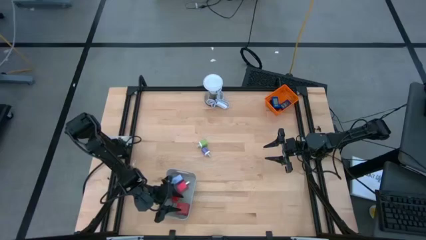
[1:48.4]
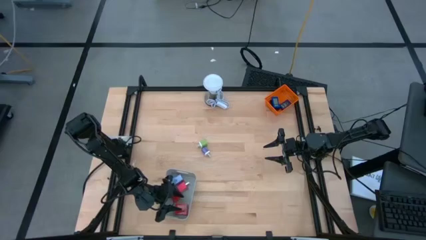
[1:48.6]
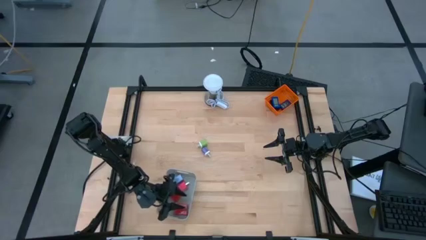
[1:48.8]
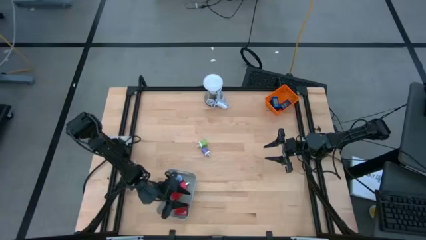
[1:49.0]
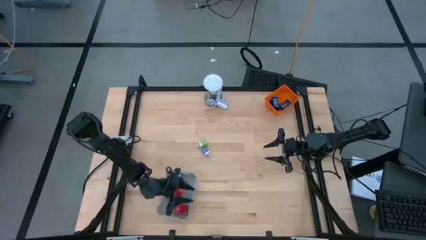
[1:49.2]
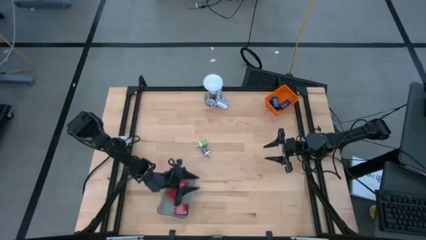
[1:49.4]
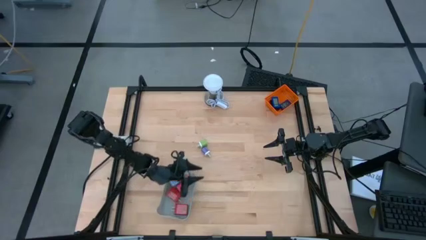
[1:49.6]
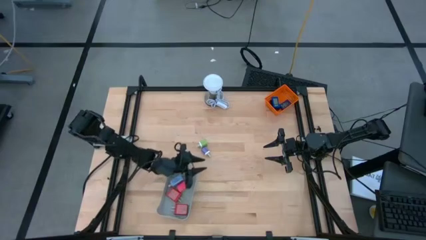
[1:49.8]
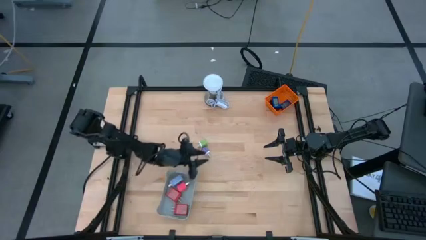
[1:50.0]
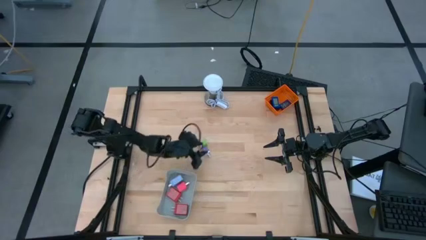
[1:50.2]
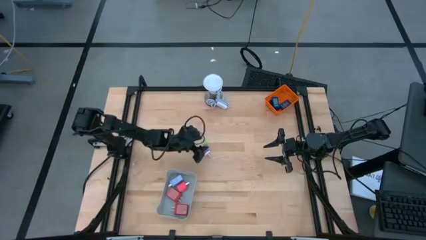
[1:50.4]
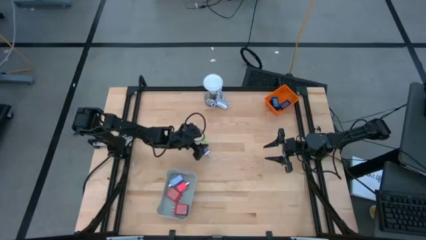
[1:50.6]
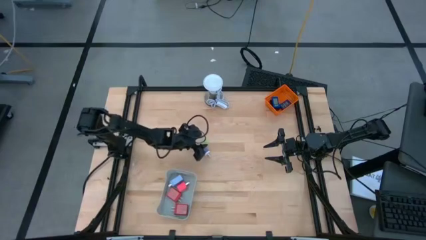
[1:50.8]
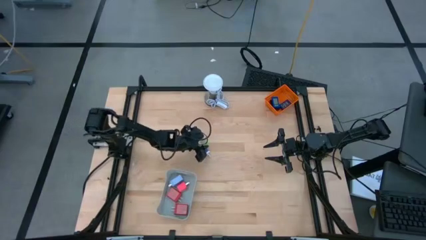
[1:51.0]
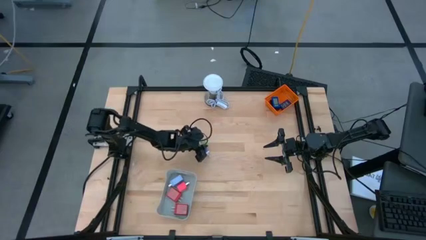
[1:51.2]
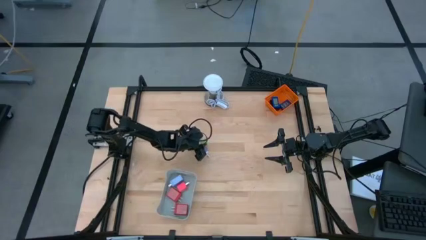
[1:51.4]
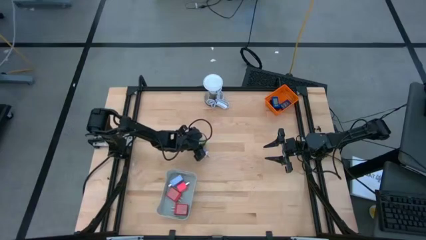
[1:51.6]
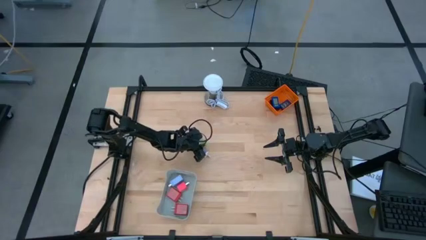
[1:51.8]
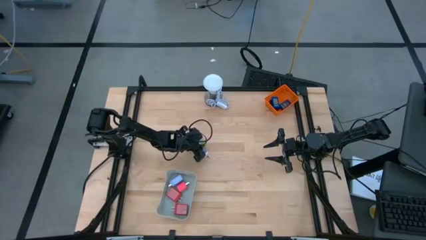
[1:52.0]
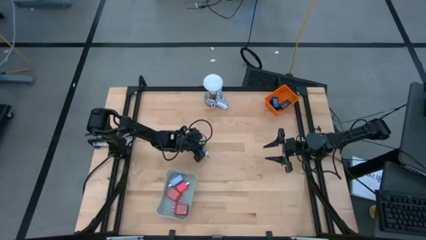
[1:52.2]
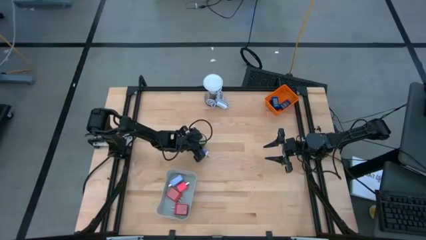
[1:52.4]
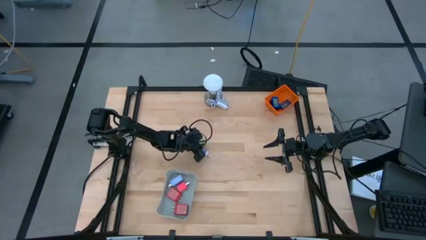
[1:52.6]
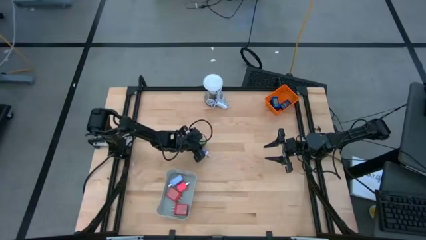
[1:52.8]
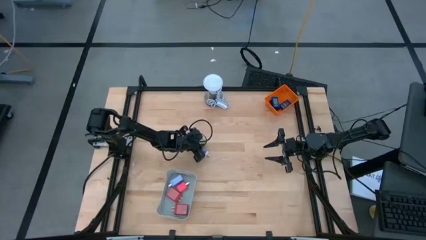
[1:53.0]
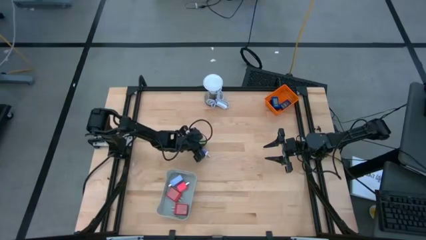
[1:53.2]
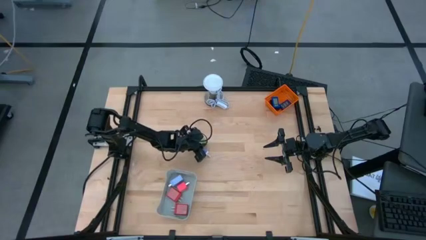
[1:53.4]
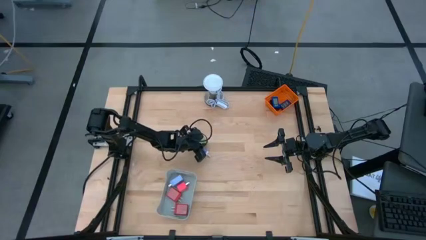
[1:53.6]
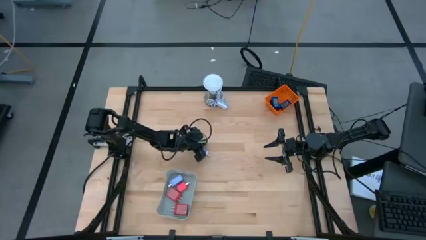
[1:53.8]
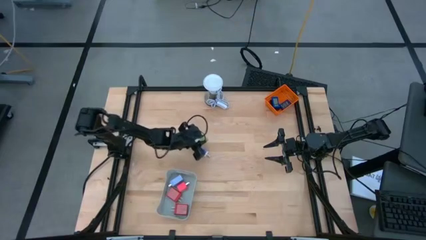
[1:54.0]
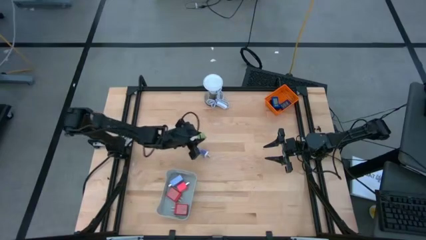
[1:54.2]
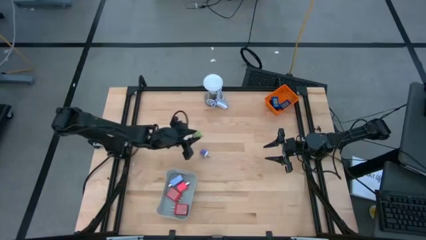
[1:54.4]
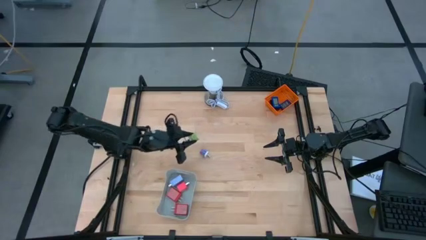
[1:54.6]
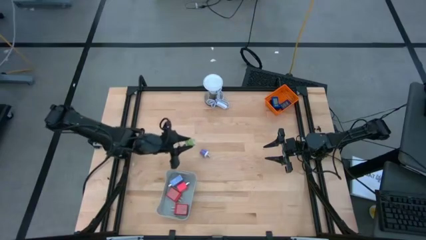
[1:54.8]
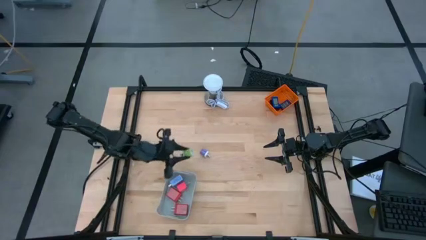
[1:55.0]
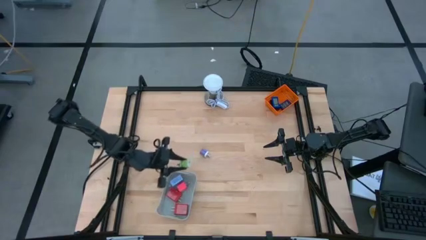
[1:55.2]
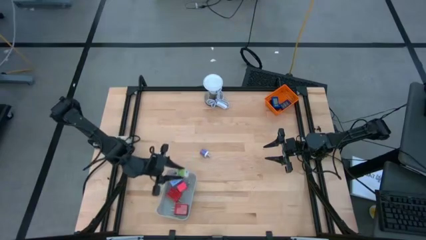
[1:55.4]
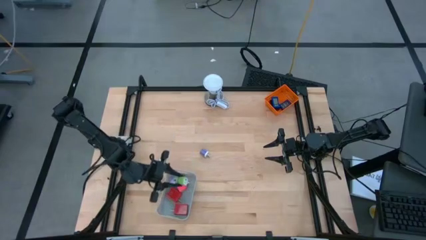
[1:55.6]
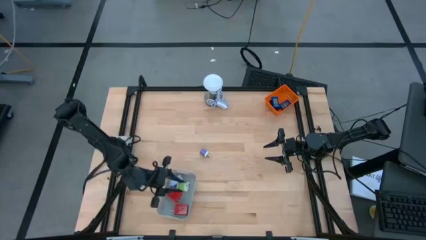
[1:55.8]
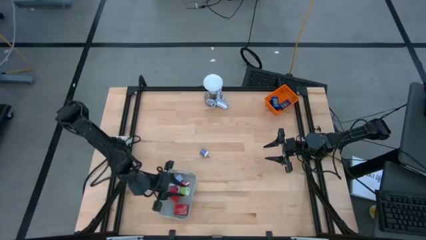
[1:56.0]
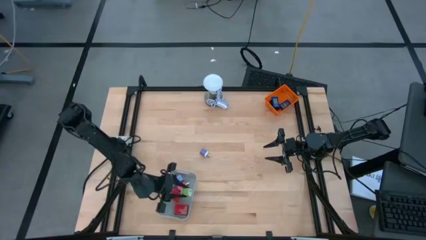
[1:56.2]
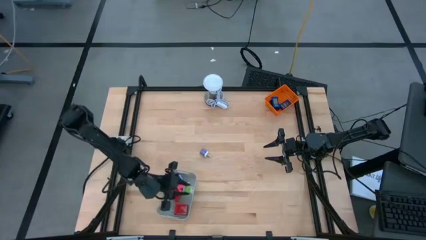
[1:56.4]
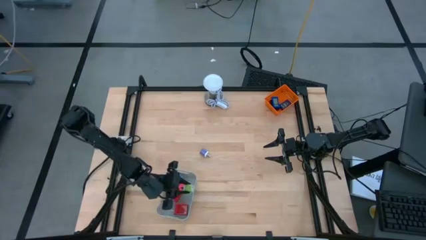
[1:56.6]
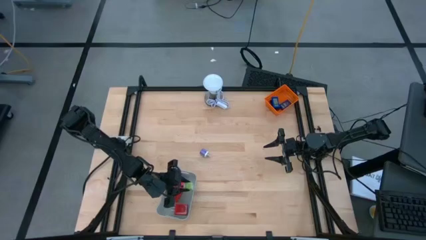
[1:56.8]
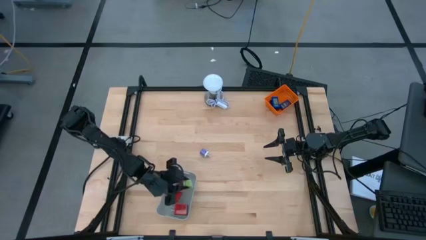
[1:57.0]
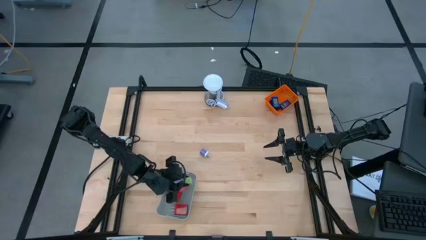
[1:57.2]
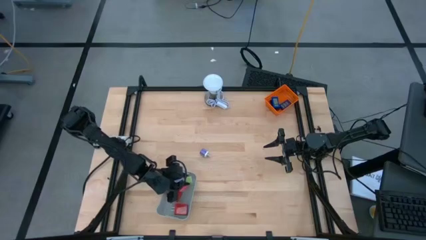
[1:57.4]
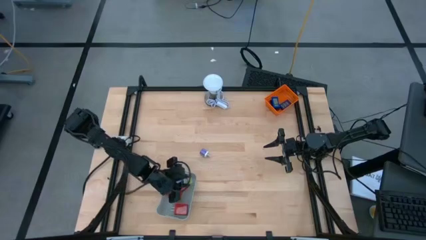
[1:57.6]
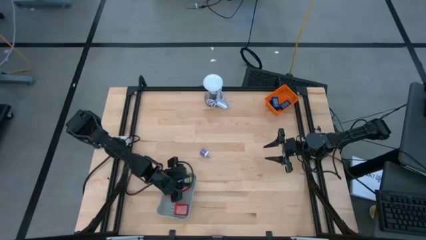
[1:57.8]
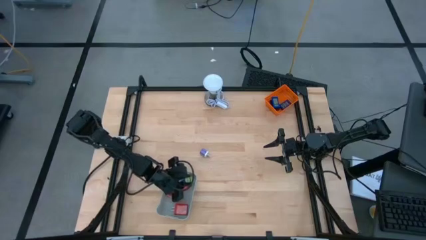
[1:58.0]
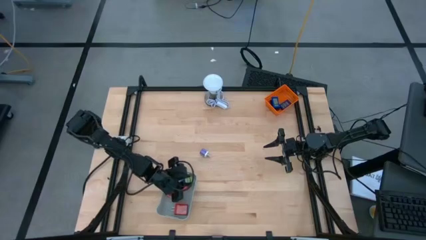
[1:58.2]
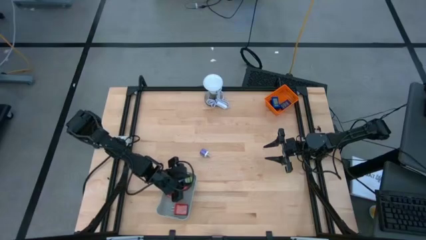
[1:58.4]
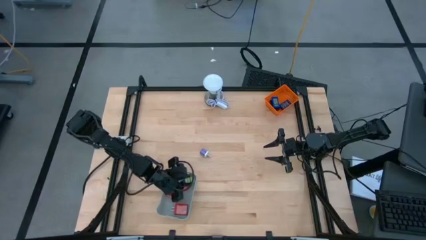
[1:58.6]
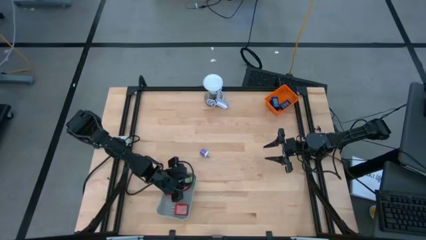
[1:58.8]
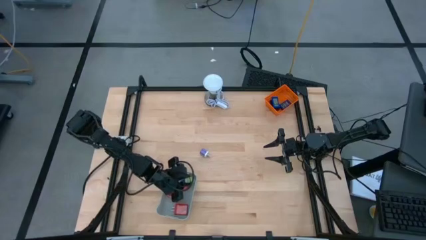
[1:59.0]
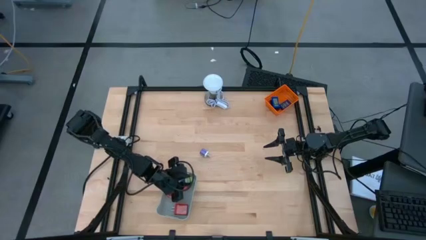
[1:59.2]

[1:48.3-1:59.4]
Task: Pick & Place Office items
Put the green charger adapter into the gray bin
